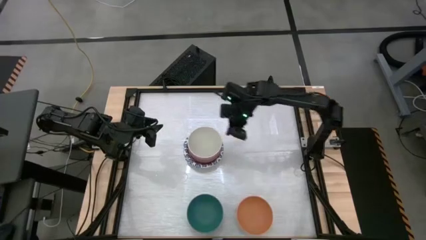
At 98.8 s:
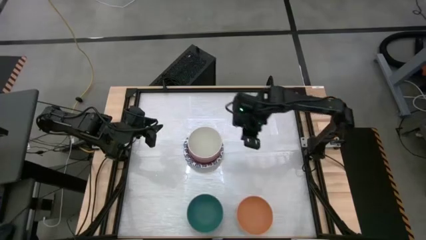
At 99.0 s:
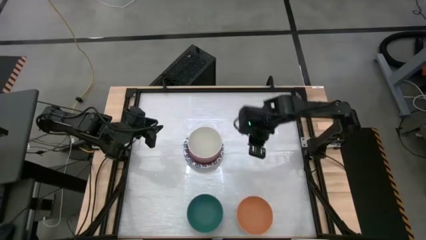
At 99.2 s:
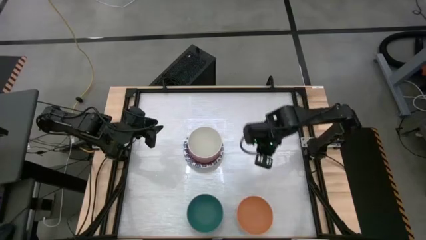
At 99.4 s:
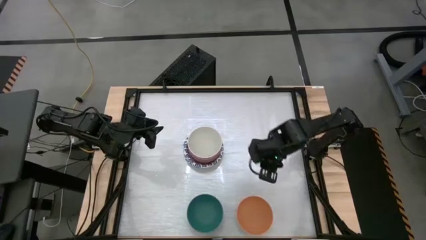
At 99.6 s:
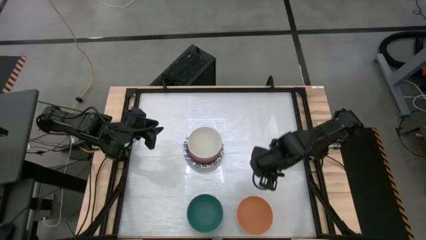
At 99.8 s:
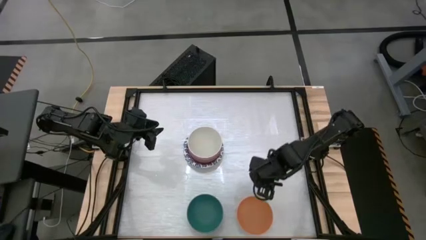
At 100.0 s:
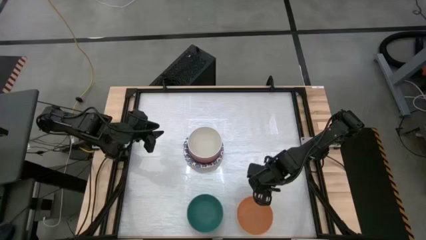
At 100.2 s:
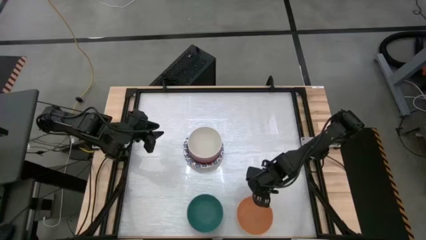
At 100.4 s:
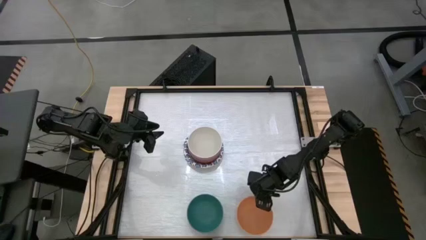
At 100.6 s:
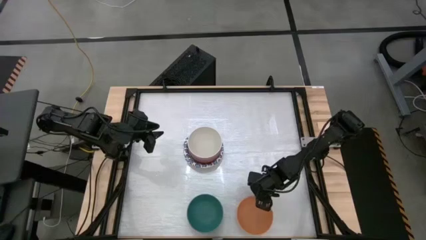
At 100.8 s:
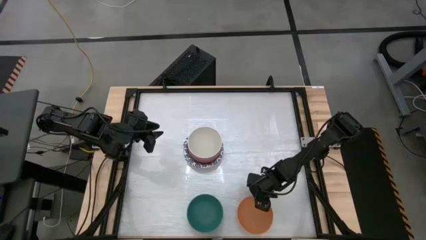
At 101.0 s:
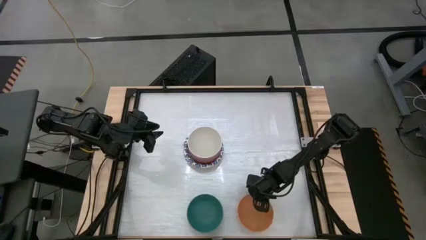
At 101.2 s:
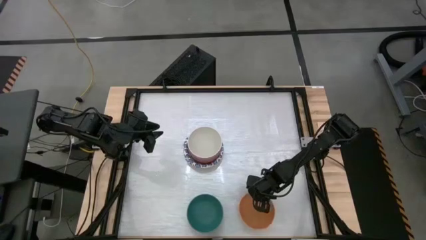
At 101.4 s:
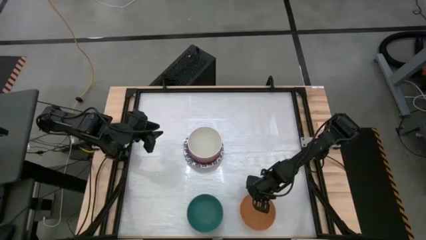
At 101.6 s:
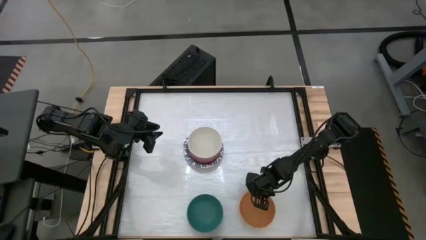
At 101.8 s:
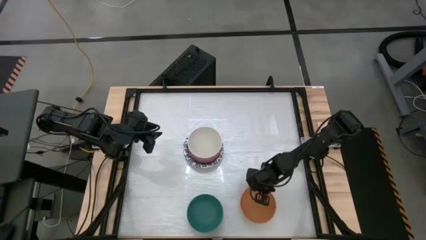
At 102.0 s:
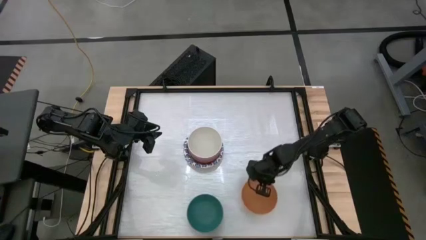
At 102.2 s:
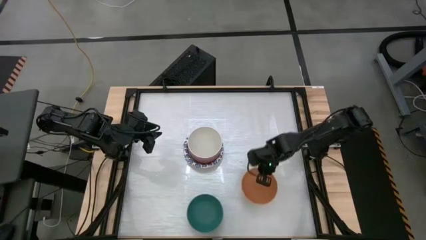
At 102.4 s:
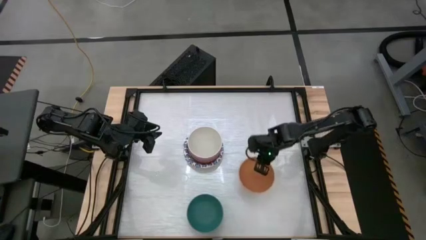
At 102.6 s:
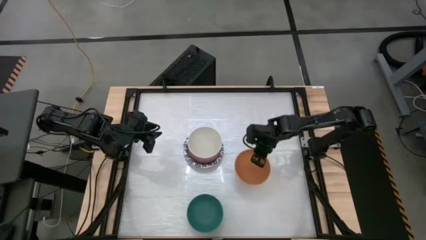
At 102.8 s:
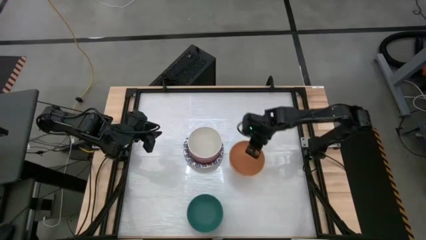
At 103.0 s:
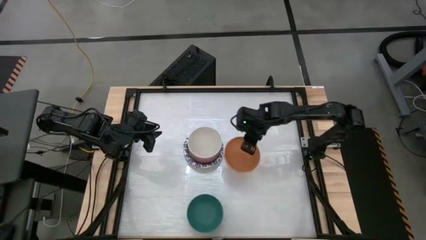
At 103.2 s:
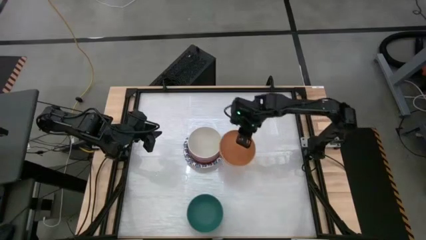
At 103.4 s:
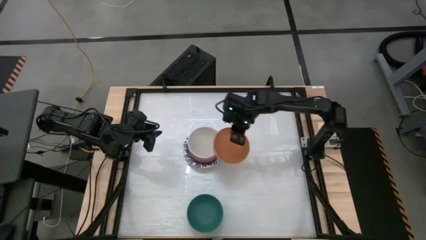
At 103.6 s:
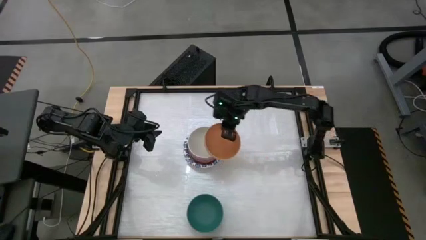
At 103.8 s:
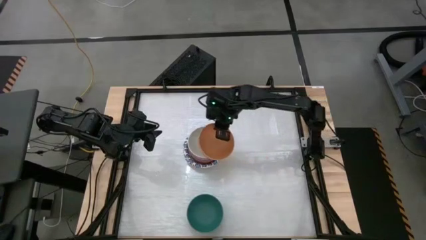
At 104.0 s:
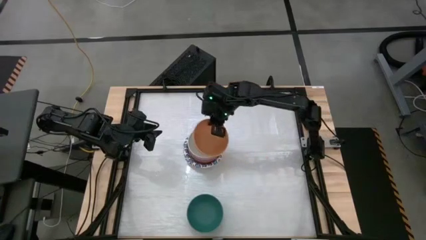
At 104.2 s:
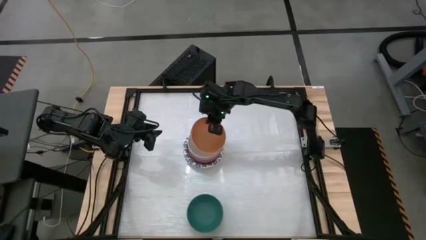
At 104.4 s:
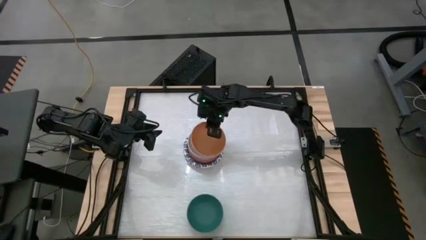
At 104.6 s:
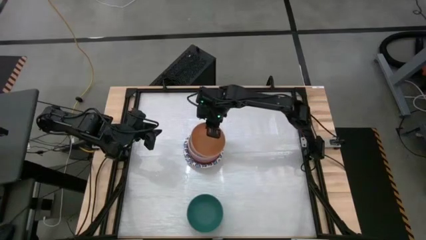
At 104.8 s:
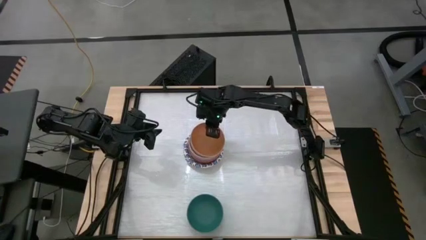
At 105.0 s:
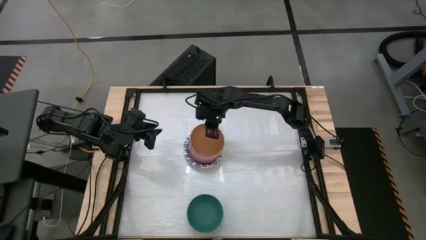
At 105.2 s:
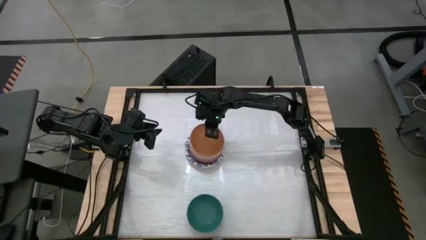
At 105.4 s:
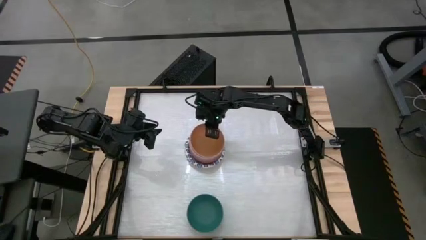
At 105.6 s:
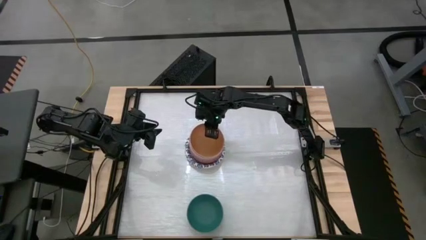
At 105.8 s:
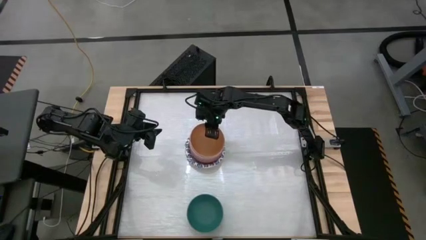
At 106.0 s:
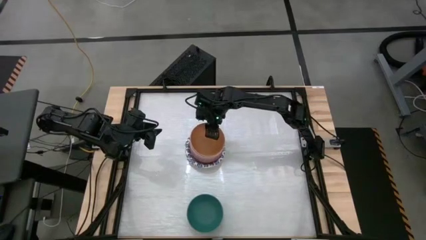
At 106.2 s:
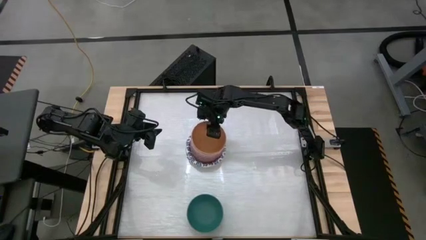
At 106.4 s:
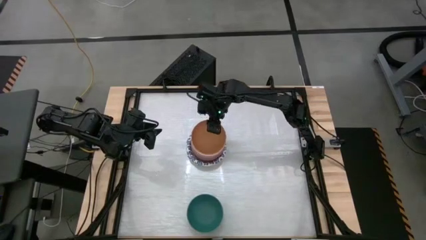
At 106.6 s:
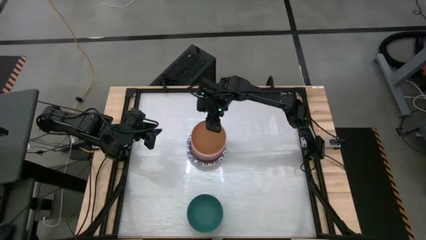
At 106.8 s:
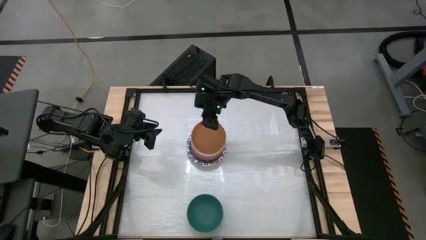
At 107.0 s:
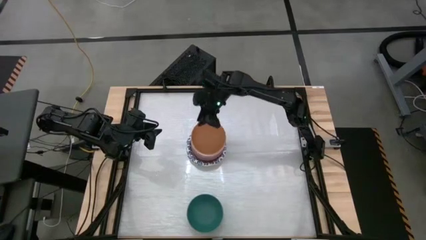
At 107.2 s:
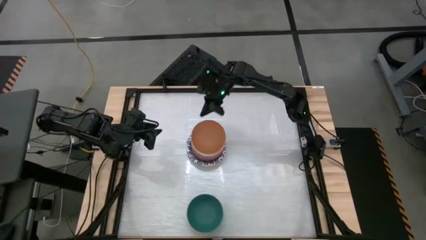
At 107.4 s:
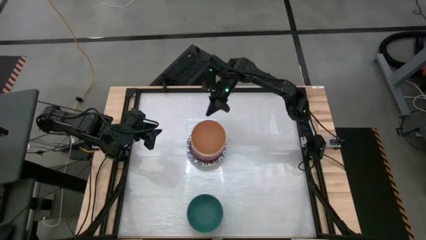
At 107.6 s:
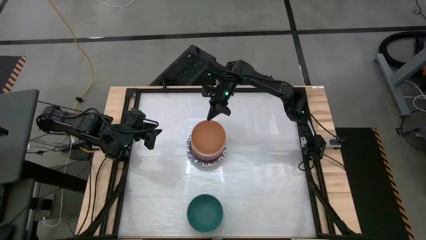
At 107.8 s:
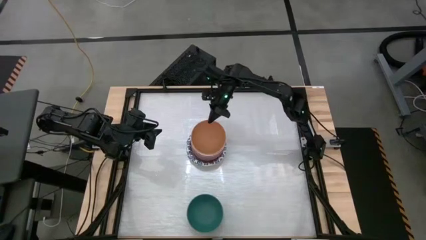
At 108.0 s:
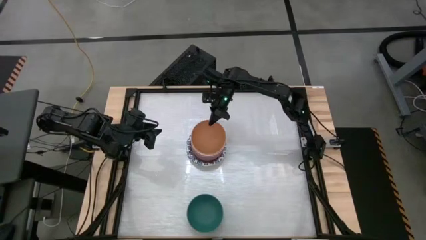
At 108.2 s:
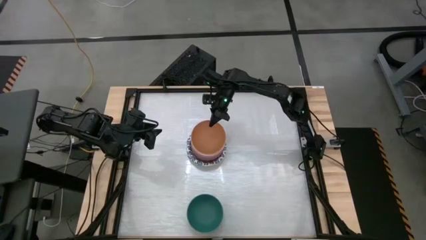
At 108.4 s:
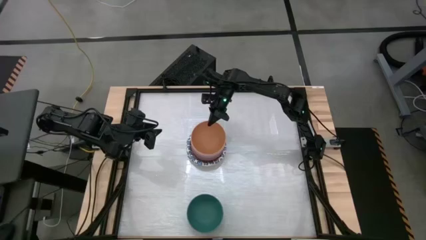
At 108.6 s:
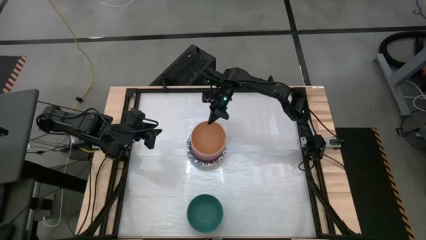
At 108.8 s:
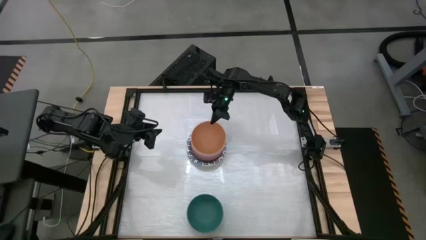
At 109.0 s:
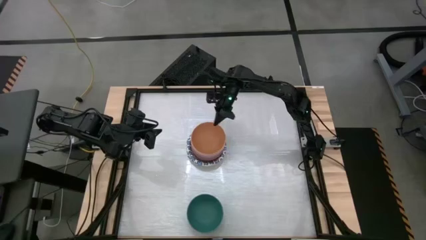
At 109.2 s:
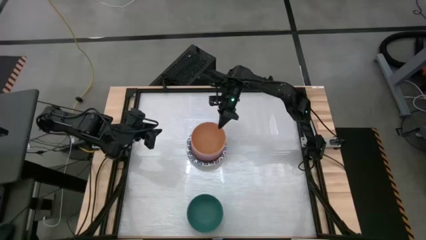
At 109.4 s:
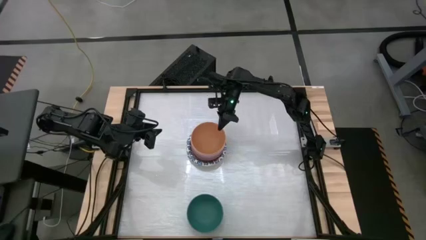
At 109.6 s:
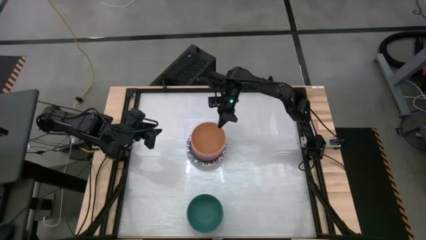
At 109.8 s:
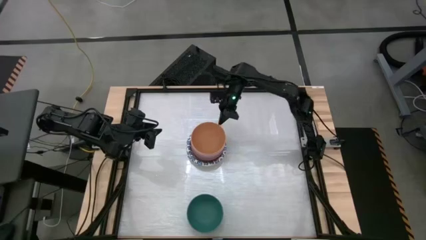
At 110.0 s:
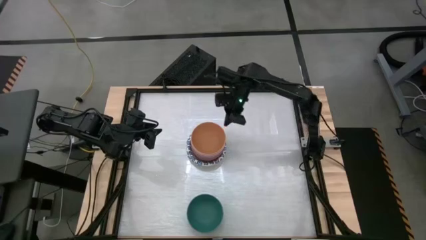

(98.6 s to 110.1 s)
Stack the orange bowl on top of the white bowl
